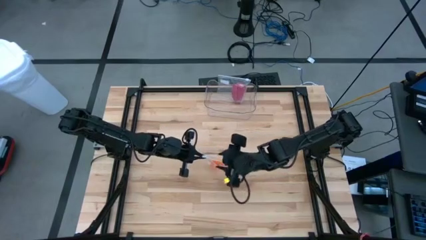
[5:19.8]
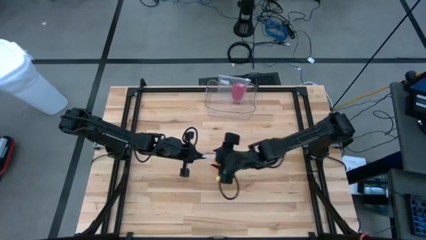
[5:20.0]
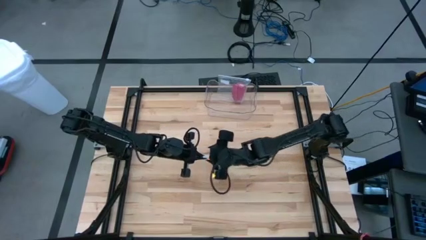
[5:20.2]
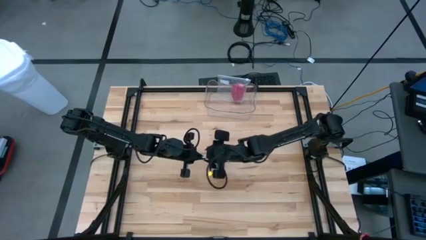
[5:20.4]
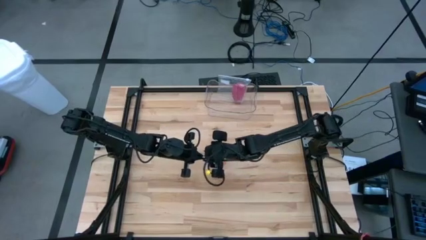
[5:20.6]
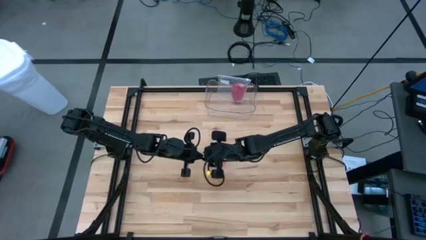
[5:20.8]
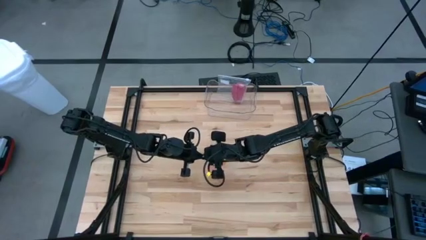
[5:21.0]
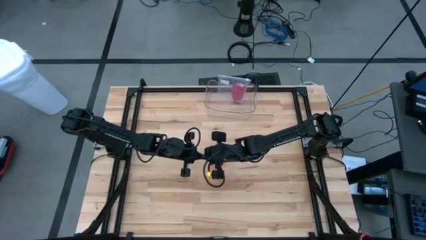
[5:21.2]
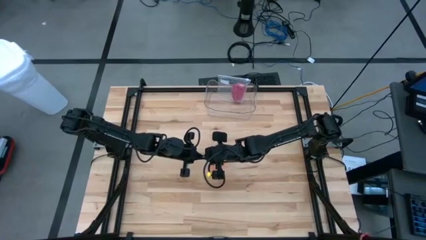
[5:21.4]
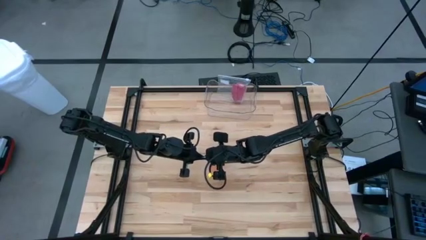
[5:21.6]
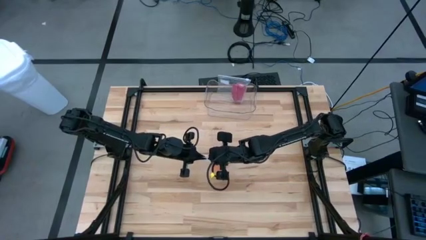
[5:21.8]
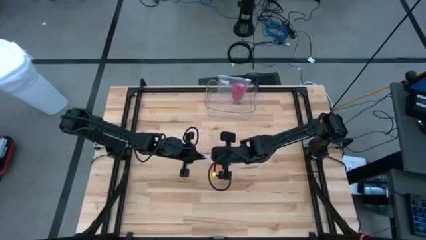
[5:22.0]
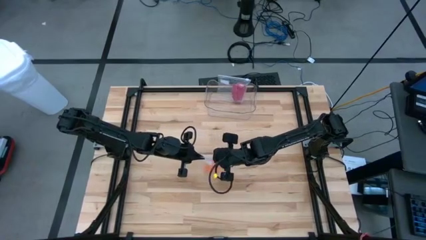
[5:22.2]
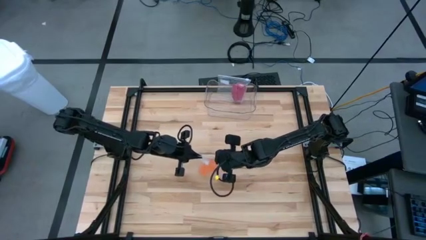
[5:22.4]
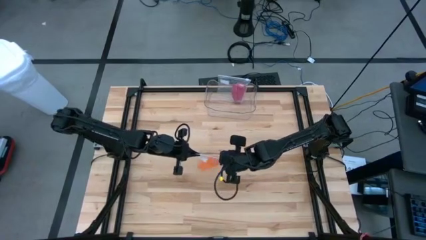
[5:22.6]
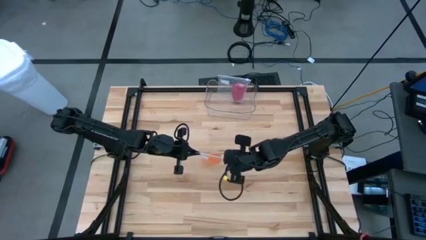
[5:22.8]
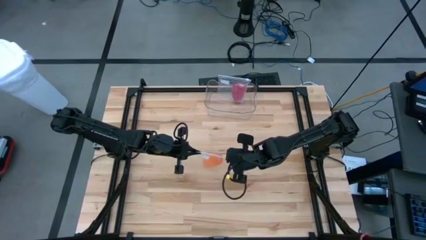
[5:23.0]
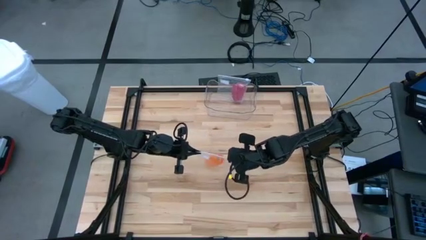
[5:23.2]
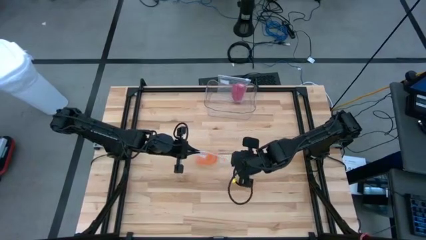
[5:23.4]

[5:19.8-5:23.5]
Task: Roll bandage
Close the zip bag

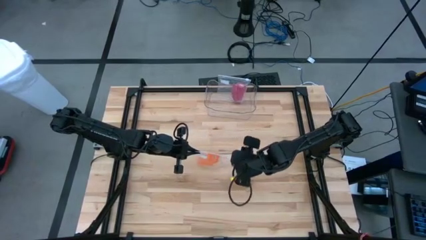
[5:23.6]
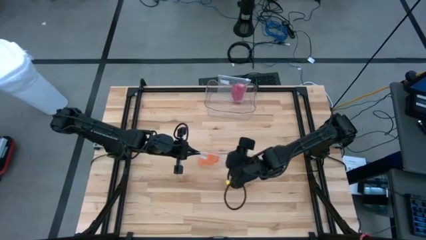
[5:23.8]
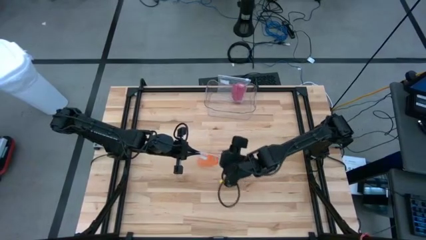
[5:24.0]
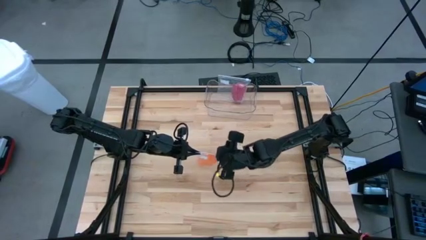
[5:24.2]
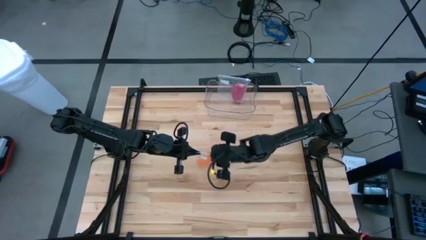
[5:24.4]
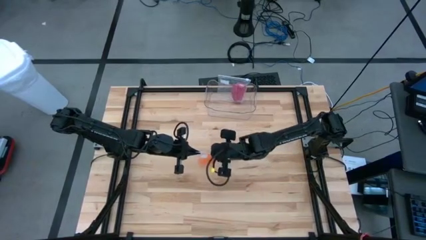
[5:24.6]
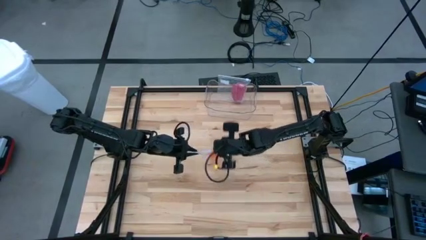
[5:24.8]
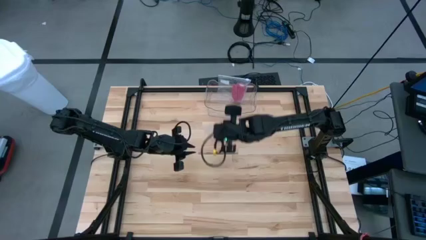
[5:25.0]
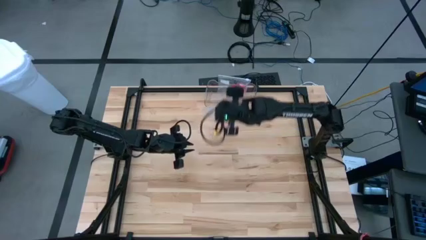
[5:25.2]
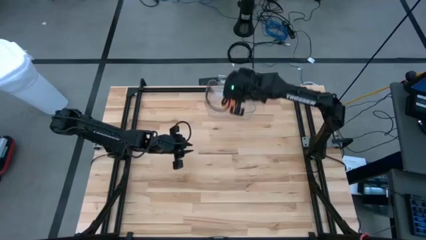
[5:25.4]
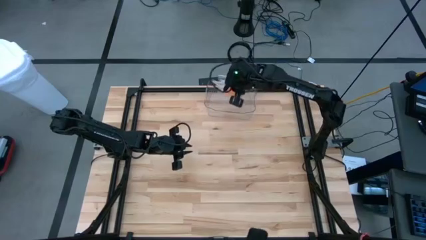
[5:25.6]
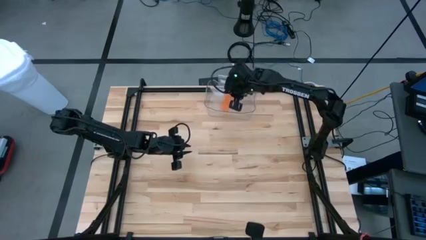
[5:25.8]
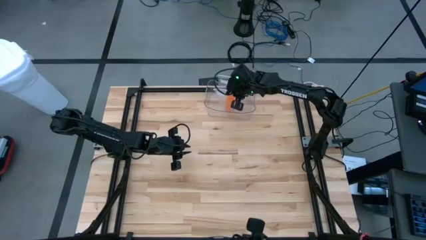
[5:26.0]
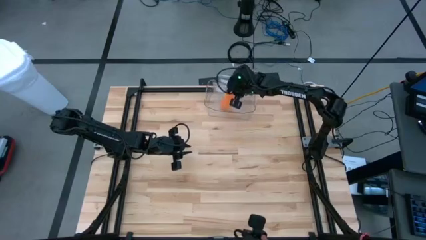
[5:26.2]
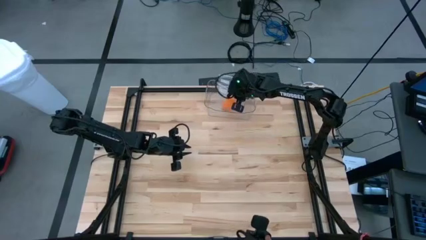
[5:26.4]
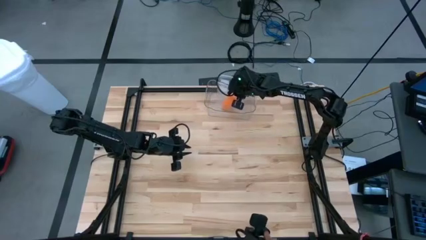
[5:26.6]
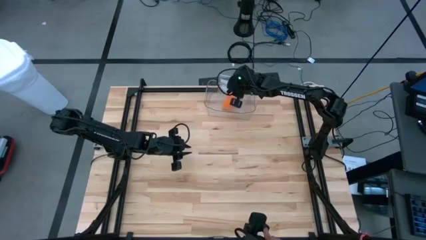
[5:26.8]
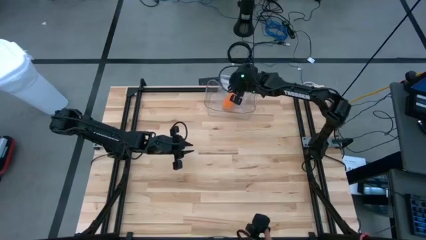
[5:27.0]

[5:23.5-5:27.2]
Put the zip bag into the transparent bin

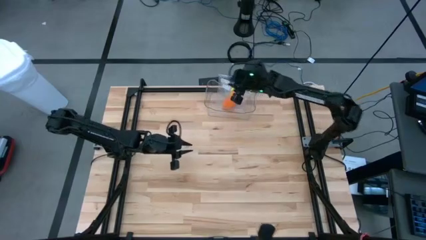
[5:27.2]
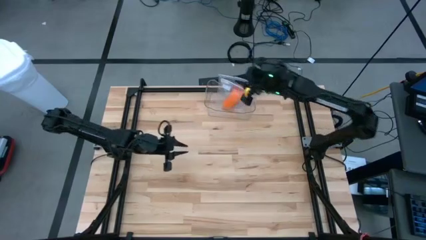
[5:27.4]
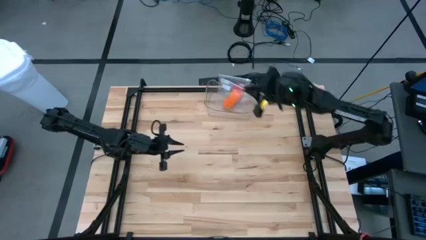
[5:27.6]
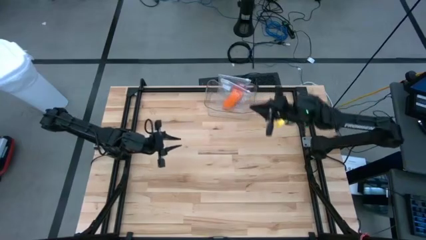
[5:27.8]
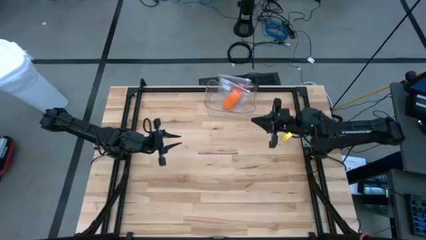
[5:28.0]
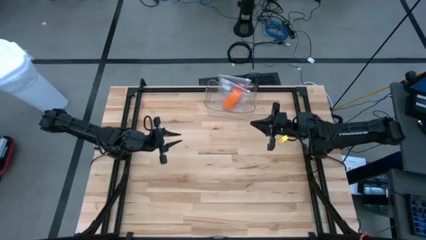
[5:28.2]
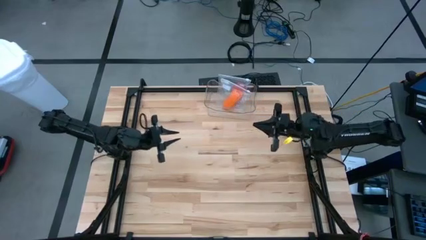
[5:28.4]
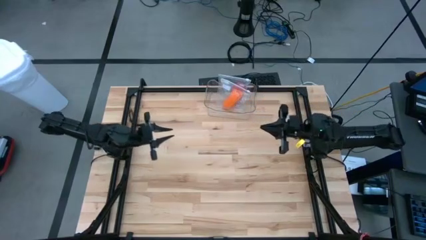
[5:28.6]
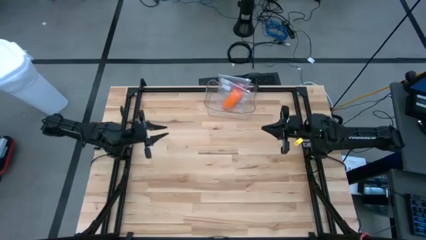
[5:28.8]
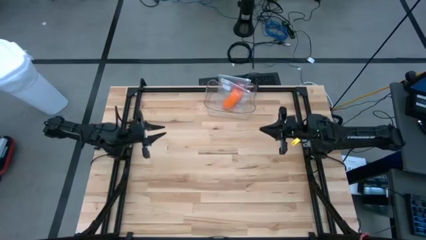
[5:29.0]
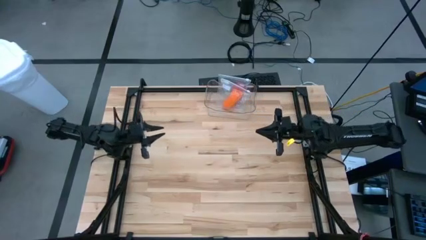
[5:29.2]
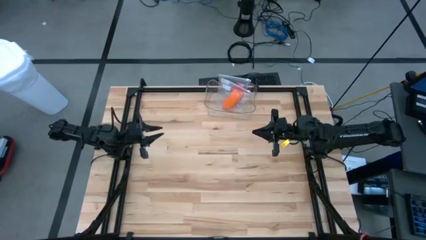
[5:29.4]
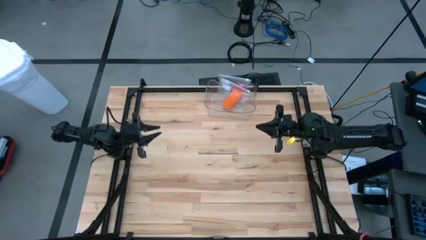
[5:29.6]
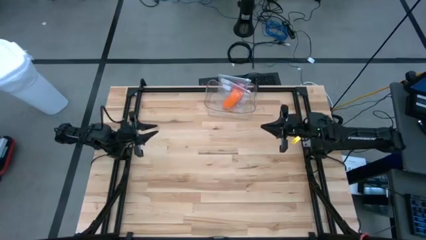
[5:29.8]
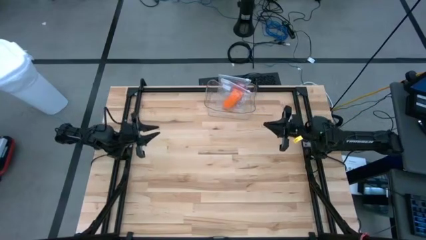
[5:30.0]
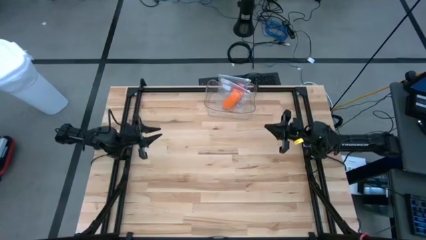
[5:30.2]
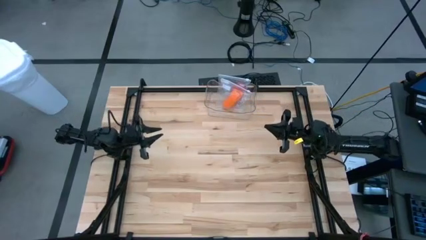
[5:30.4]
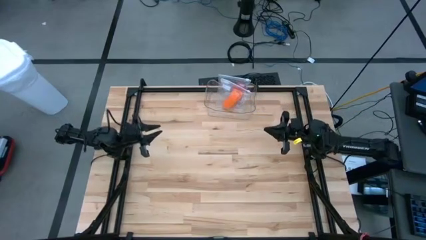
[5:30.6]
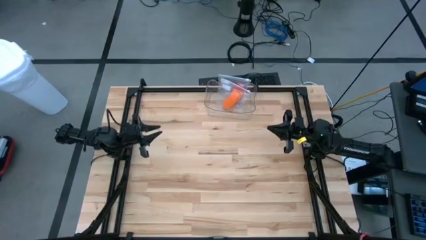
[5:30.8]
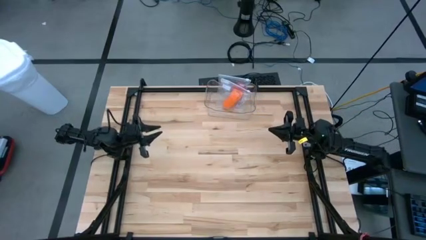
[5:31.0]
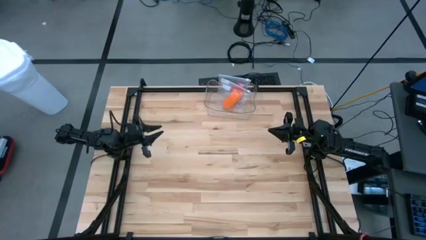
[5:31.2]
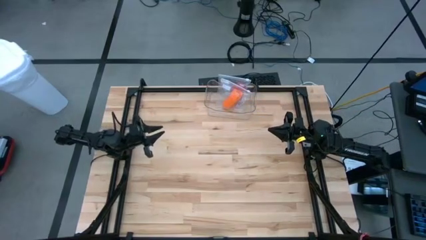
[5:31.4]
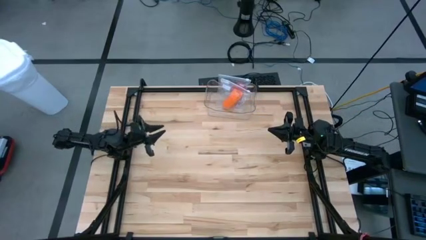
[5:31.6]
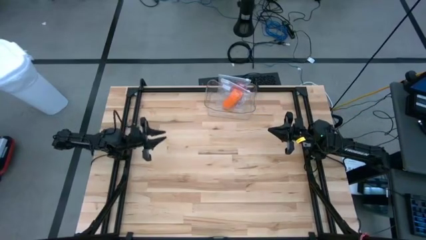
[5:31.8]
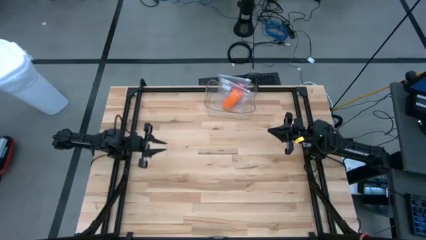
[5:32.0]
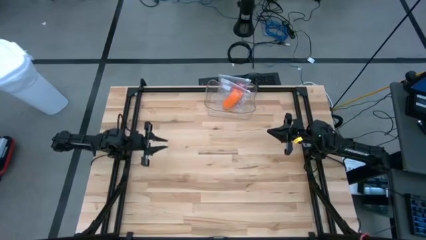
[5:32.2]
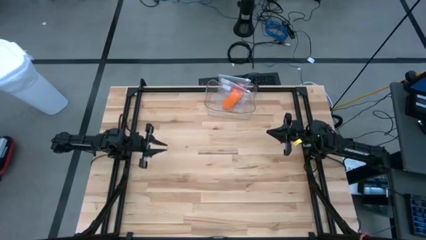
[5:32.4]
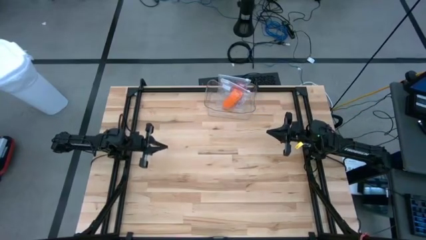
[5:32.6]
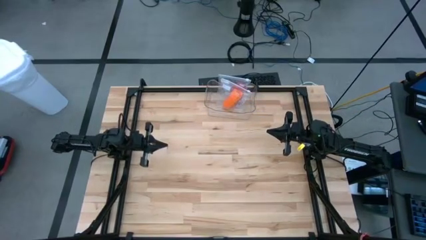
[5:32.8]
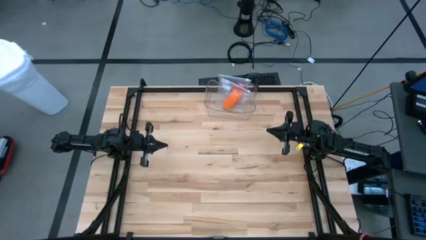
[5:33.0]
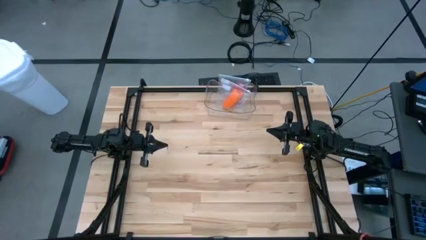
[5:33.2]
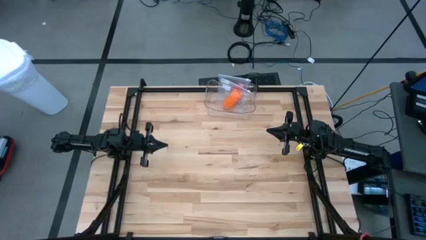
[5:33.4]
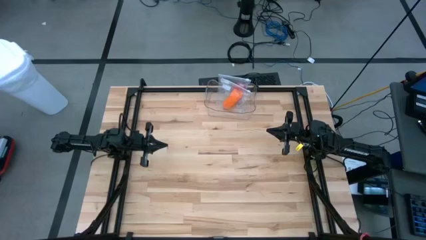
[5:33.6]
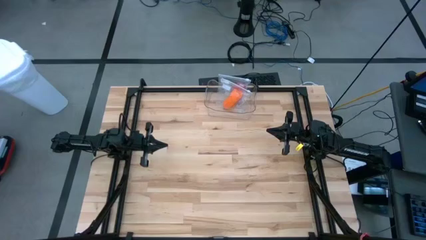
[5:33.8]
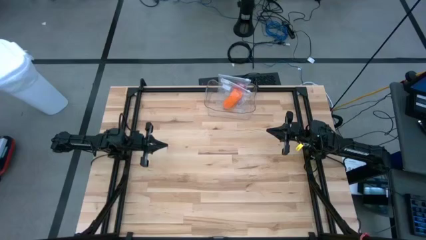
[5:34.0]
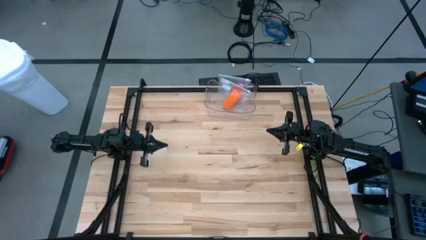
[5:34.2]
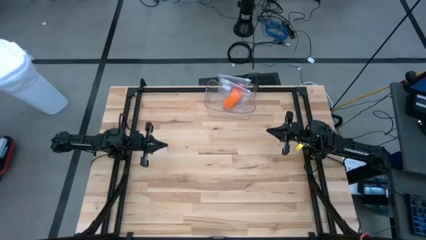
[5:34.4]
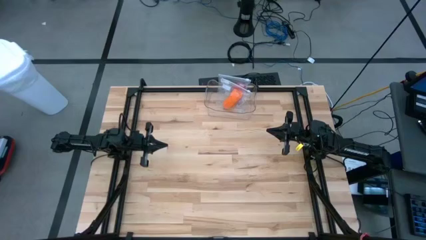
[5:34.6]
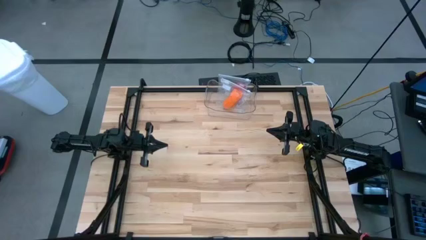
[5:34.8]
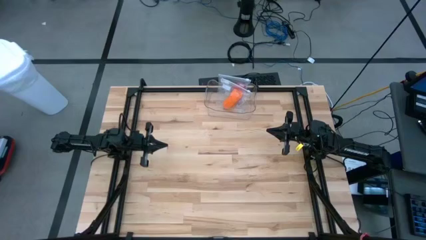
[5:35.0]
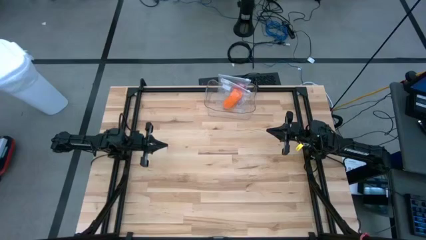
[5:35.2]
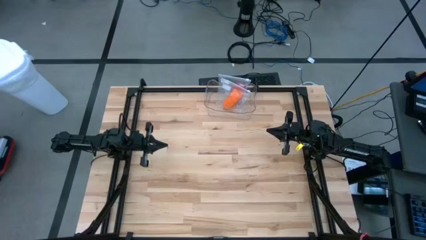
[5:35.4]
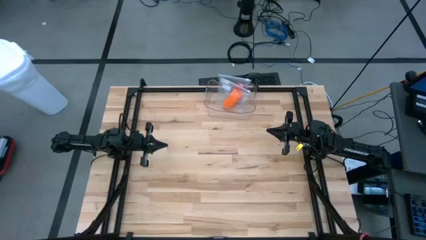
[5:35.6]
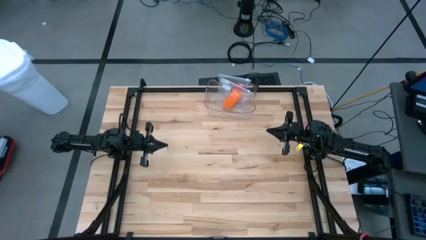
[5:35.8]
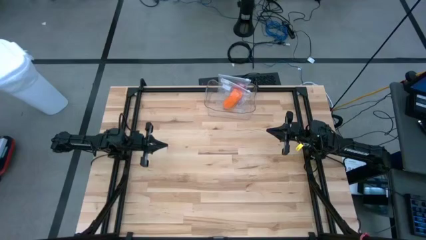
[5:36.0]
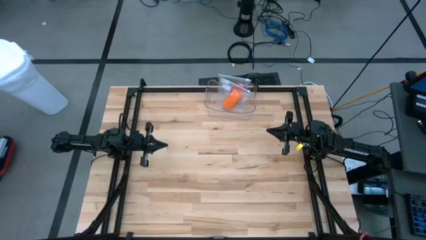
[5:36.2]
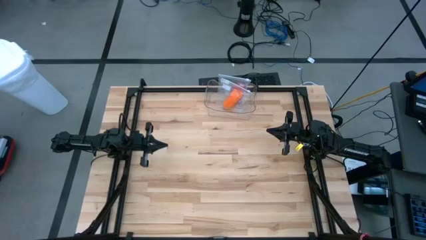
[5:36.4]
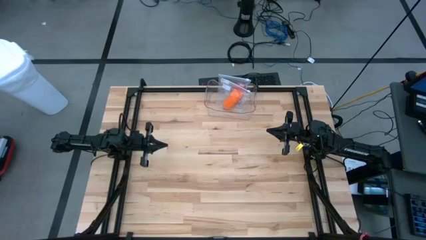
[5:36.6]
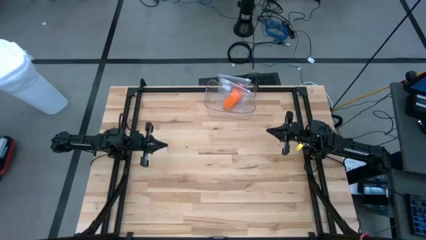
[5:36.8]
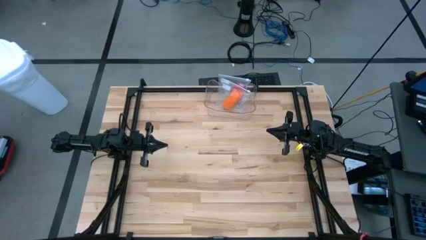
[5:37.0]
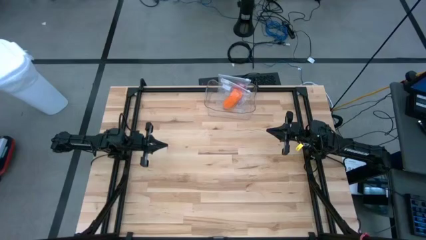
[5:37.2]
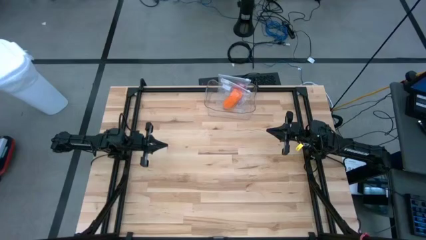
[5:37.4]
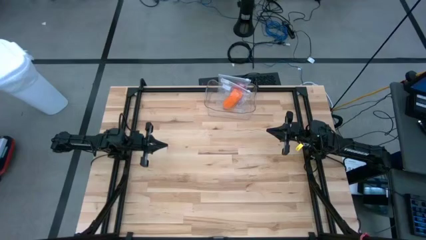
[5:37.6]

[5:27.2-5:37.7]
Return to Home Position
